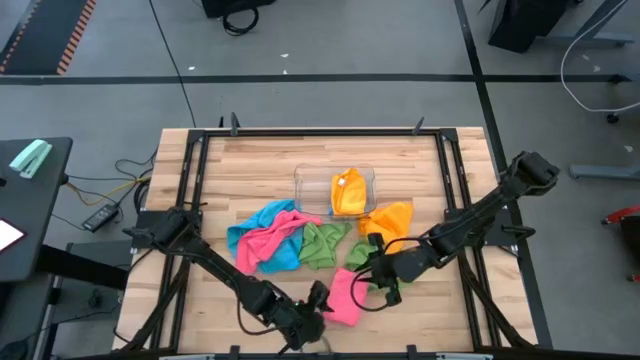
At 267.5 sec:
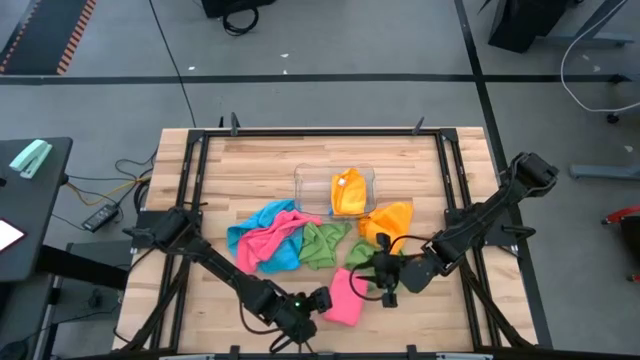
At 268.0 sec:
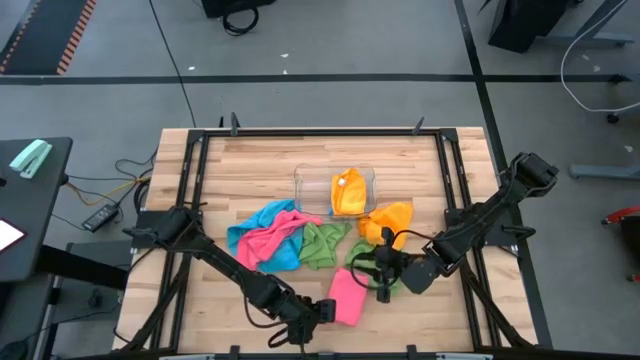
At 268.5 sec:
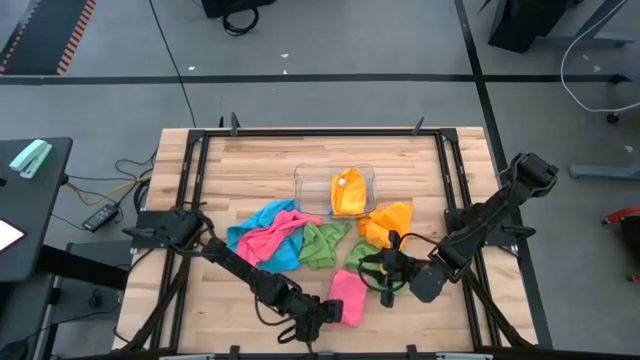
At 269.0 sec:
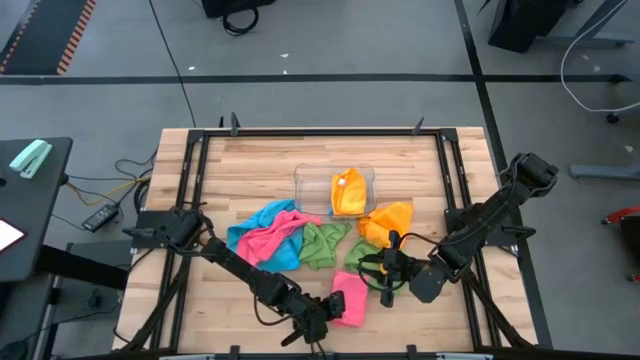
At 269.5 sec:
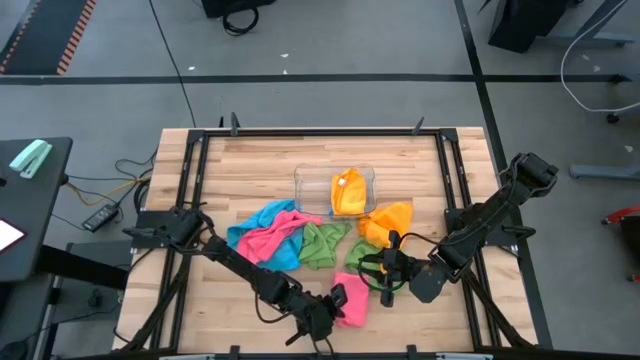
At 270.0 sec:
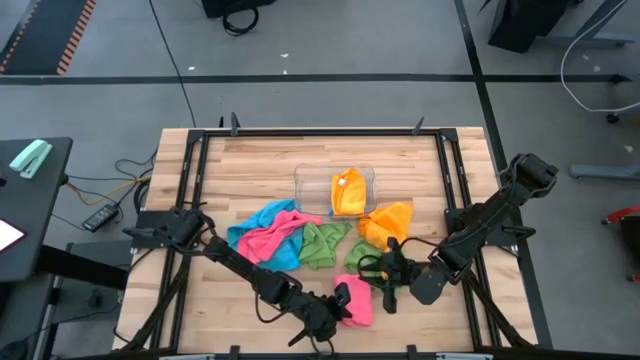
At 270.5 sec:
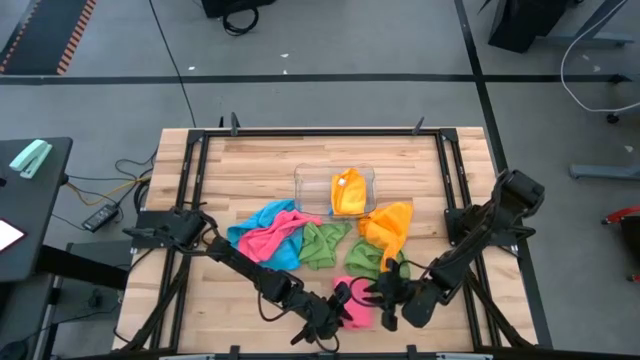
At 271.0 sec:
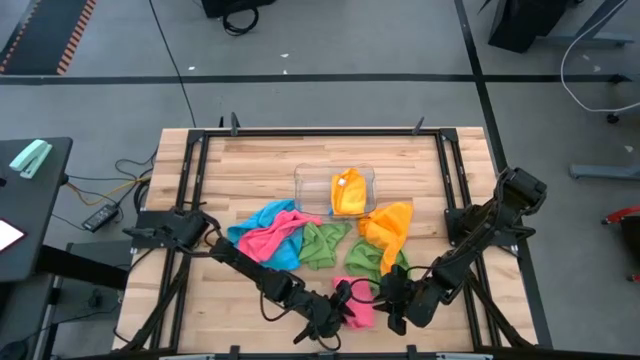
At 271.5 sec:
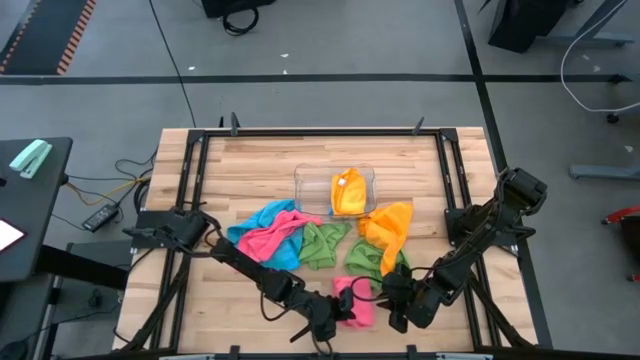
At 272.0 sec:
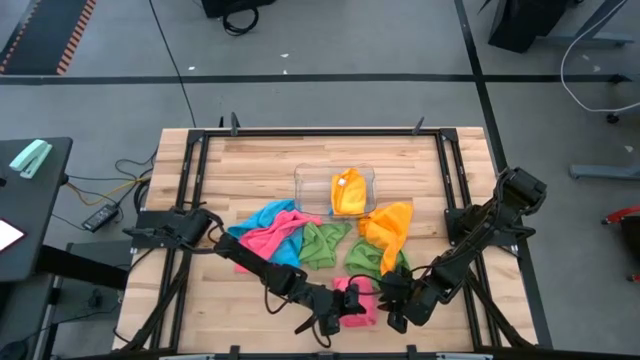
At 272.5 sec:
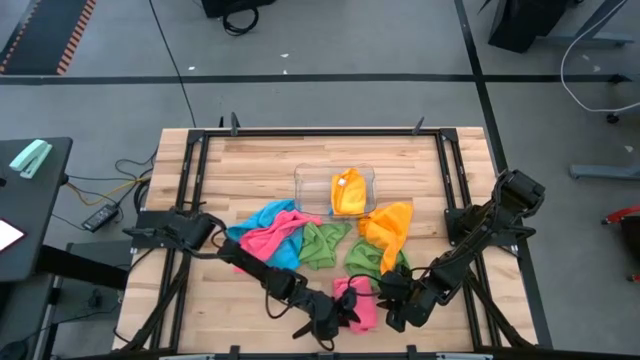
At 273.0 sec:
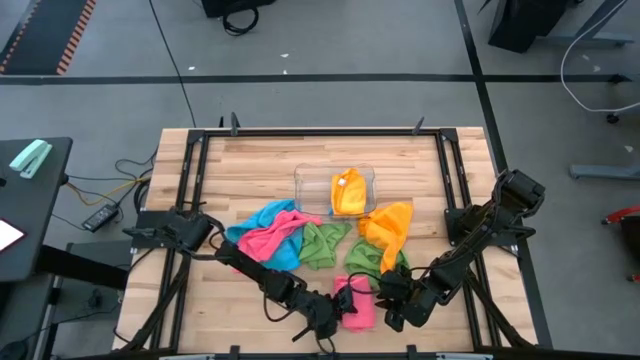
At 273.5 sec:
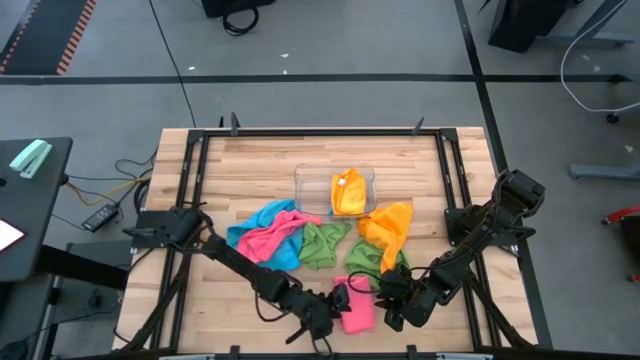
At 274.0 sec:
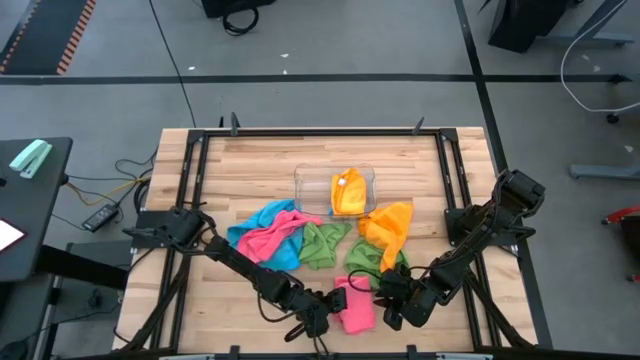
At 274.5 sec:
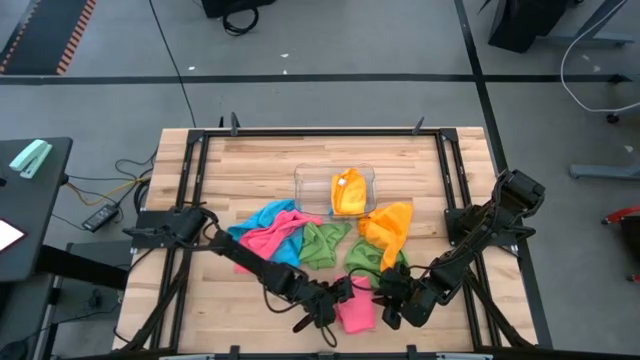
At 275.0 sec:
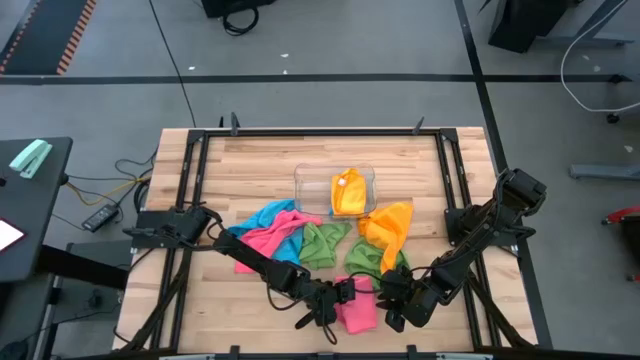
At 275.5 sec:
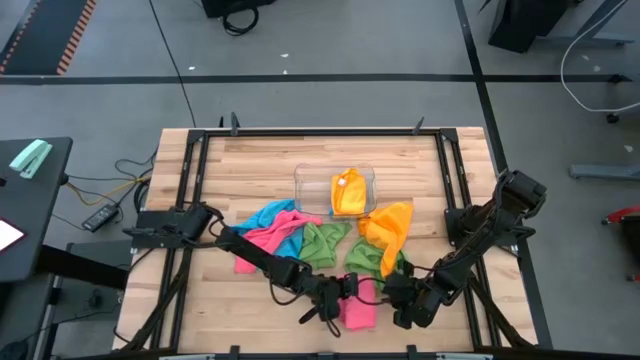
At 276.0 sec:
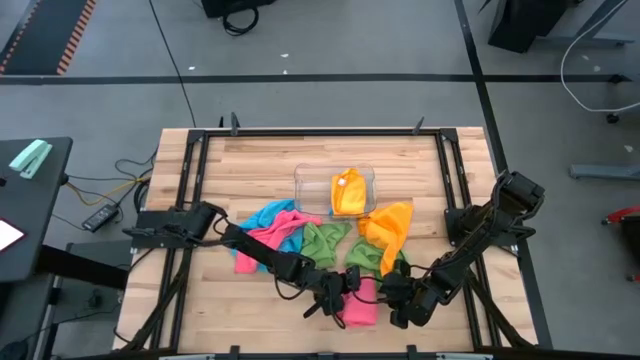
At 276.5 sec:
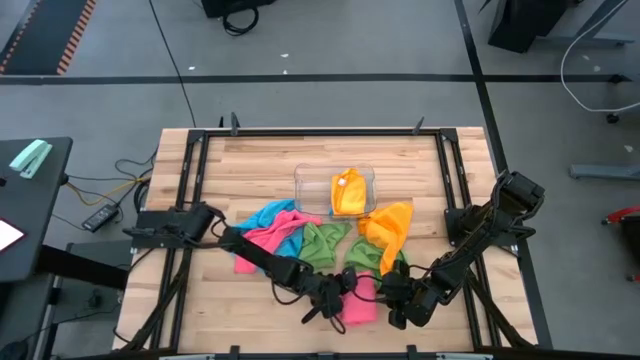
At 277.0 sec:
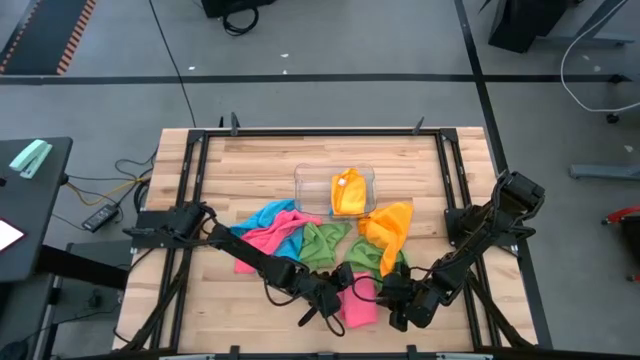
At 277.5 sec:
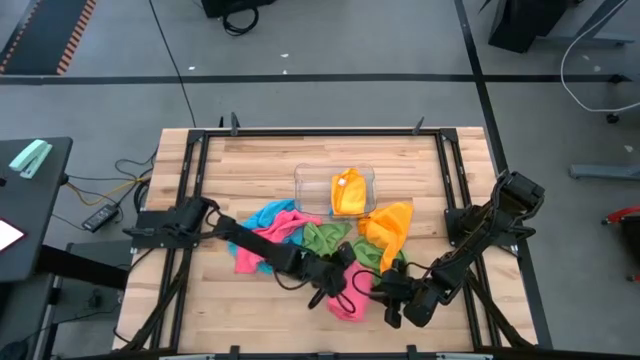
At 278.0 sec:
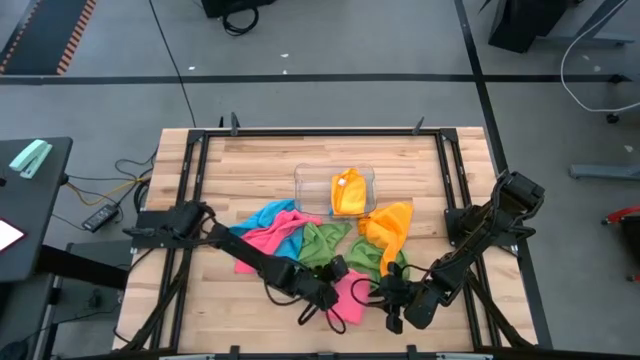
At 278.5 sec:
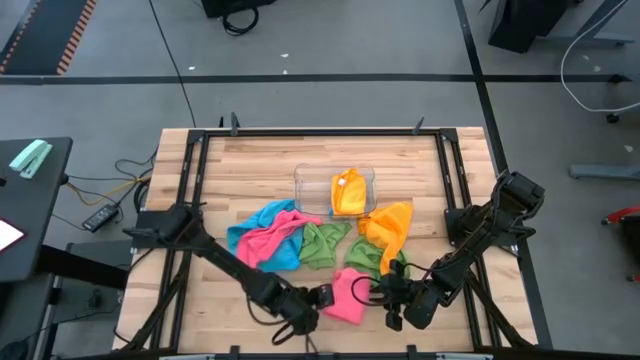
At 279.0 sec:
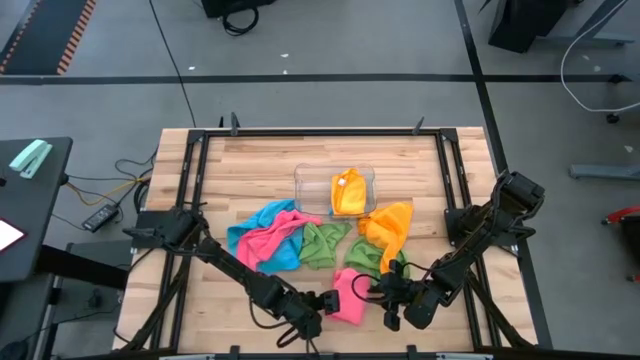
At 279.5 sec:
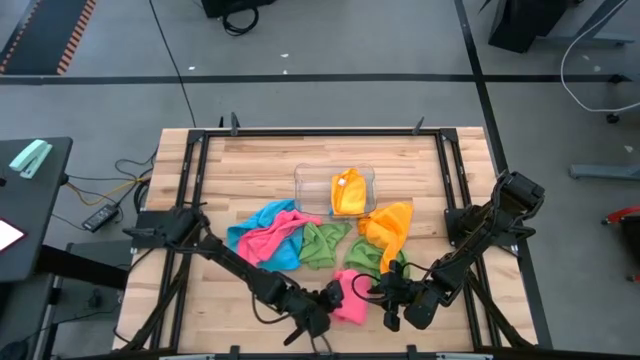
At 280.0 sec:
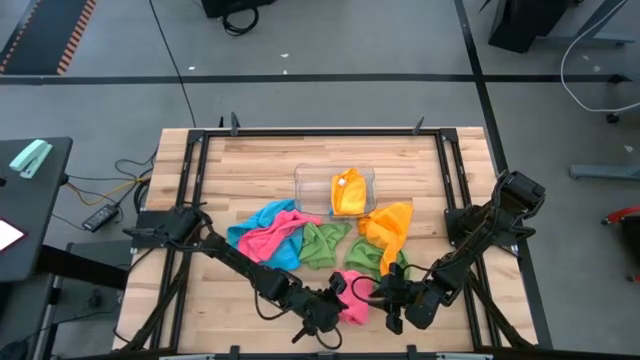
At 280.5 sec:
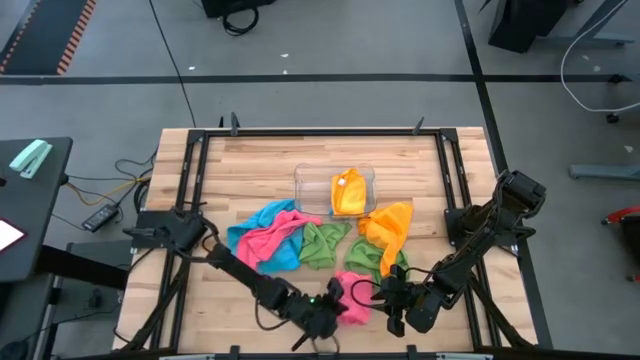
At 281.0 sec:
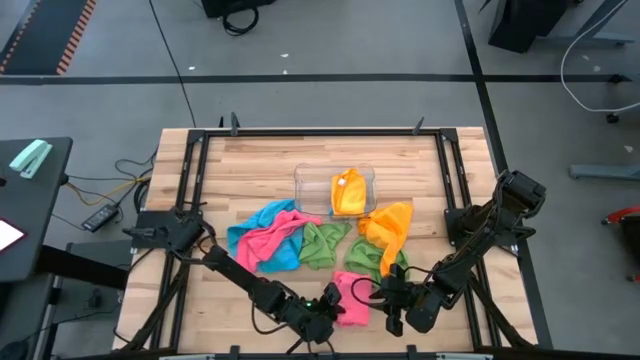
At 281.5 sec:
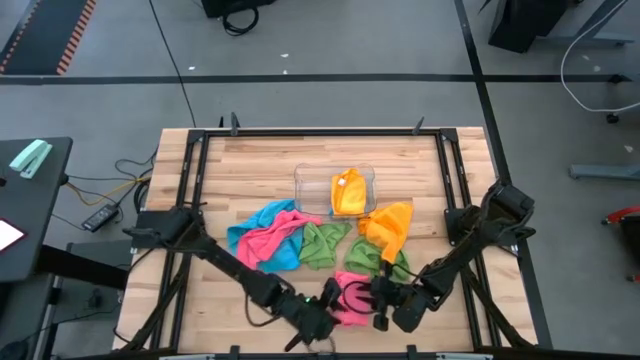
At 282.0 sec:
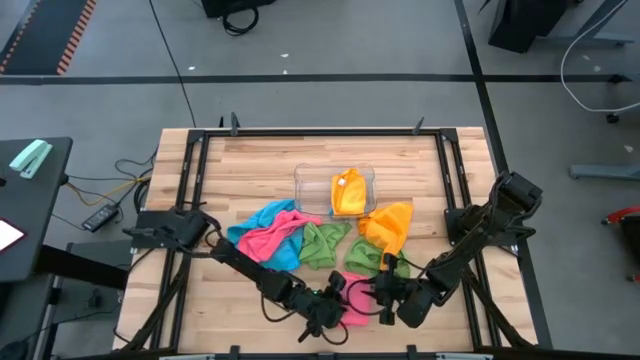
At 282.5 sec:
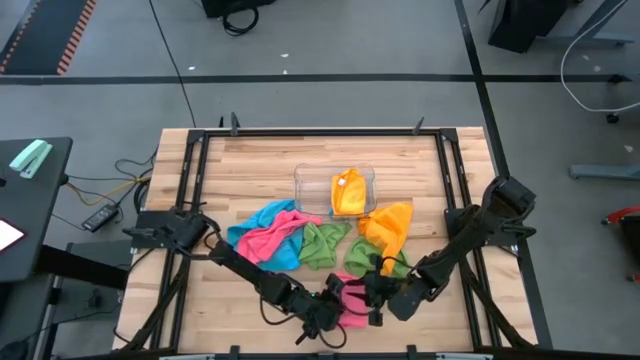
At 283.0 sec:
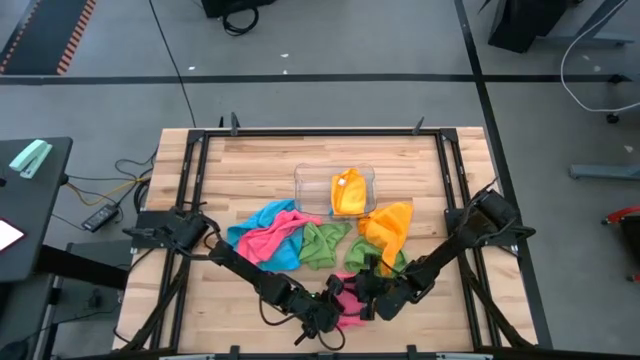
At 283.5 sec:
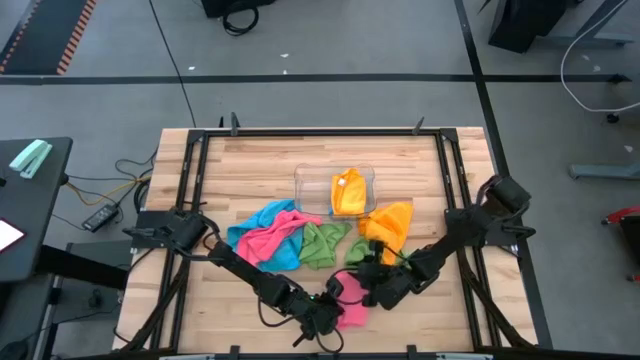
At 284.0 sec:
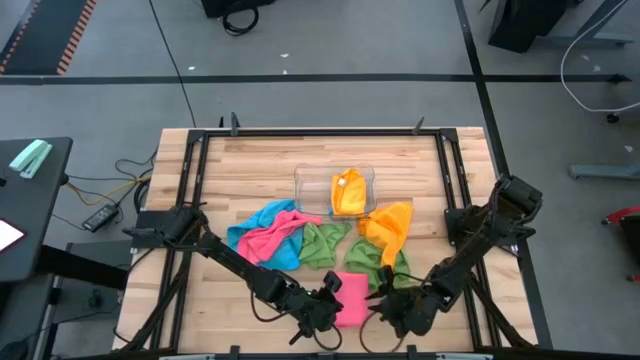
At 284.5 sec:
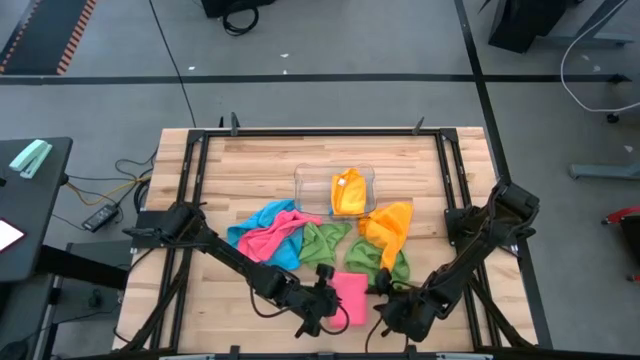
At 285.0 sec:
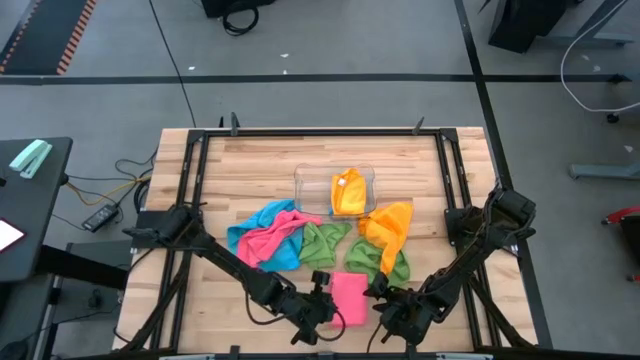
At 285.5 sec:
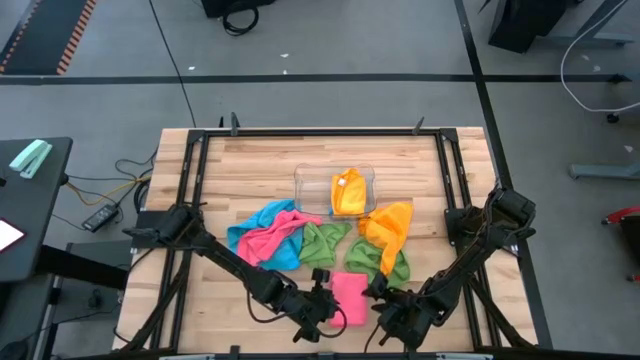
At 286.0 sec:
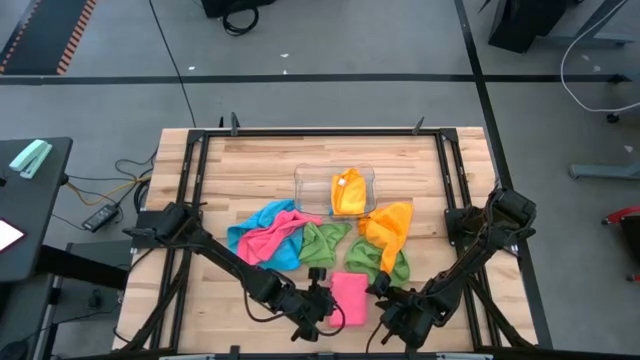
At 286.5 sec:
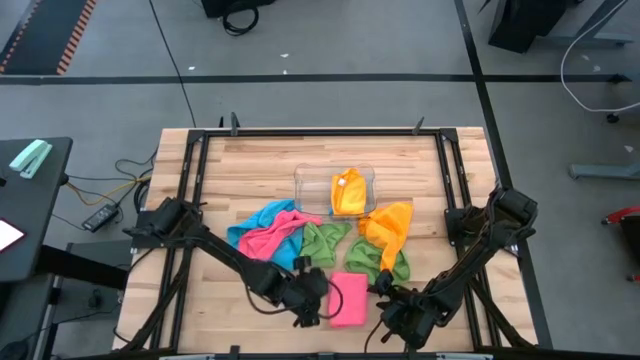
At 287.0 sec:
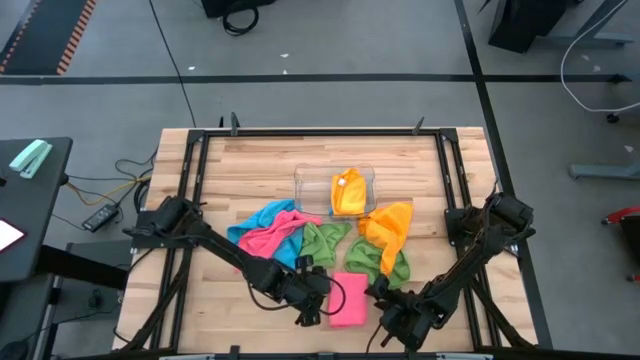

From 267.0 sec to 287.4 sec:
Task: Fold microfiber towels
Fold the bottom pink microfiber cloth
